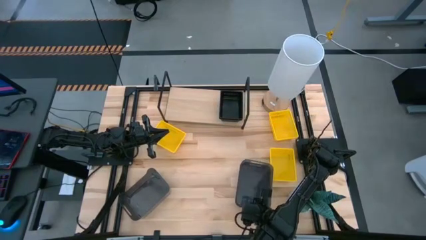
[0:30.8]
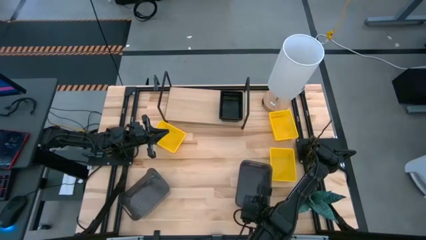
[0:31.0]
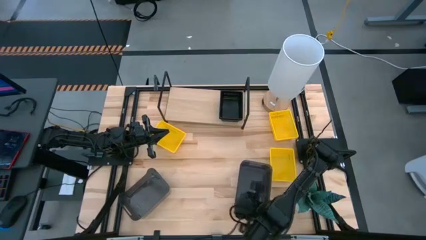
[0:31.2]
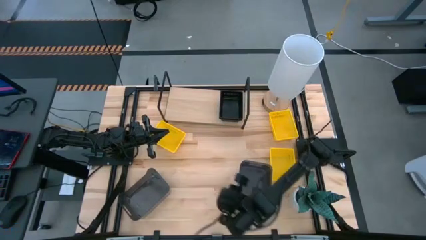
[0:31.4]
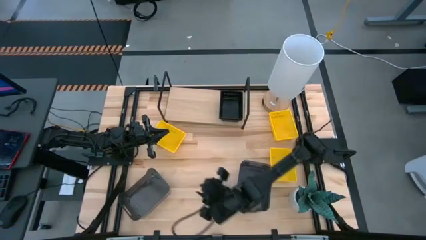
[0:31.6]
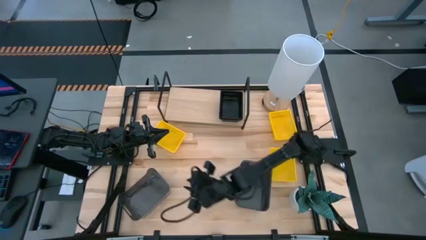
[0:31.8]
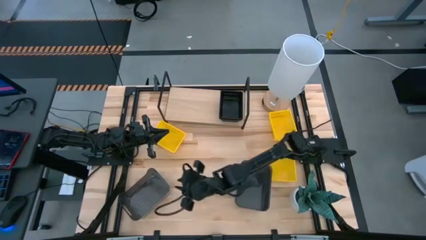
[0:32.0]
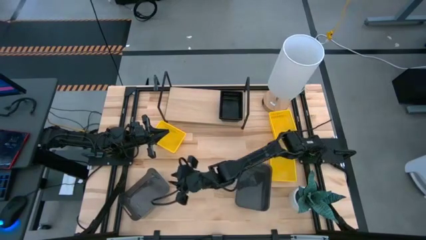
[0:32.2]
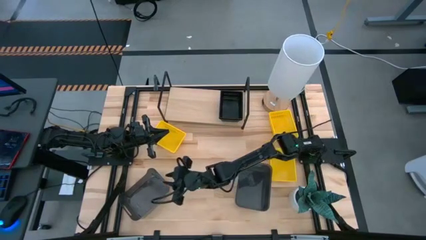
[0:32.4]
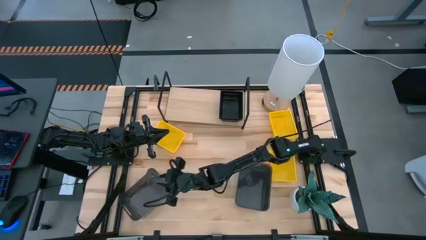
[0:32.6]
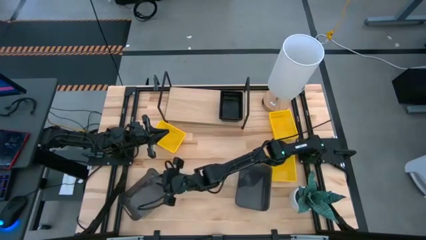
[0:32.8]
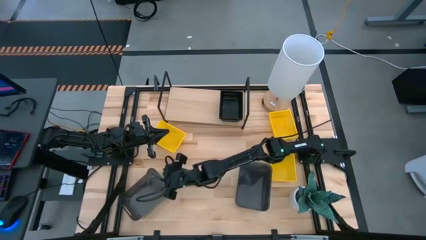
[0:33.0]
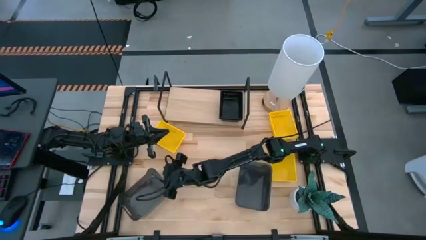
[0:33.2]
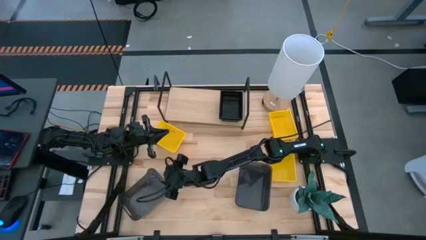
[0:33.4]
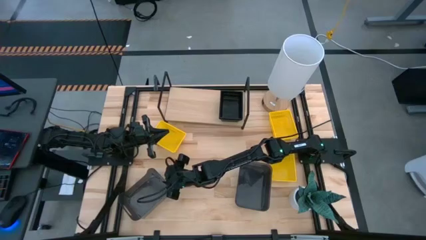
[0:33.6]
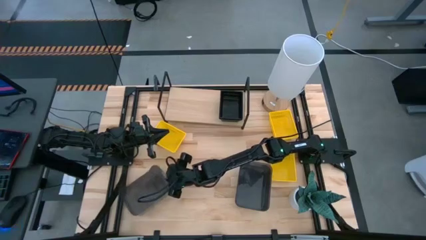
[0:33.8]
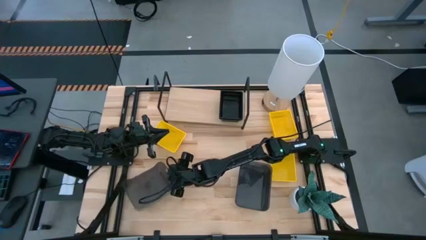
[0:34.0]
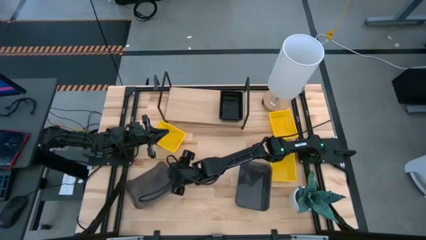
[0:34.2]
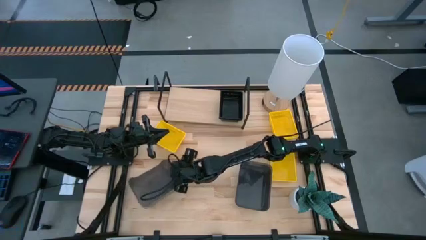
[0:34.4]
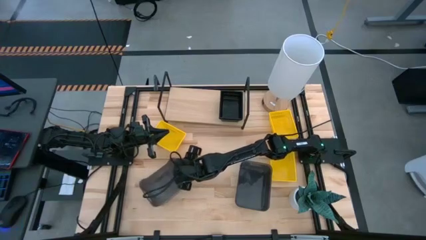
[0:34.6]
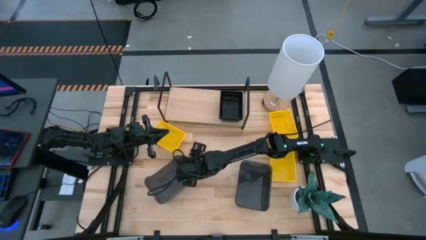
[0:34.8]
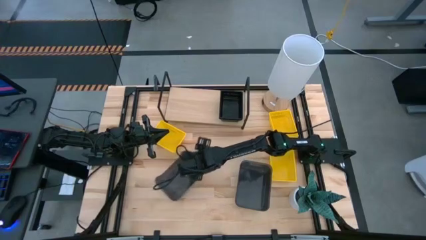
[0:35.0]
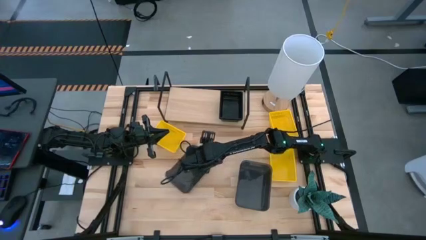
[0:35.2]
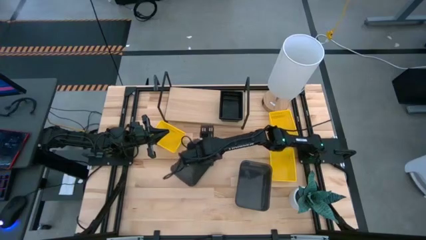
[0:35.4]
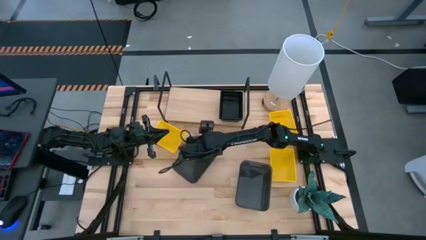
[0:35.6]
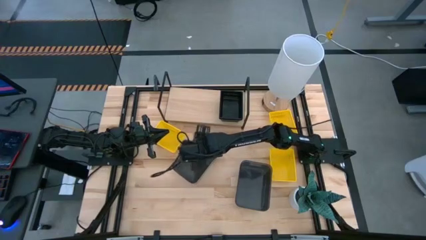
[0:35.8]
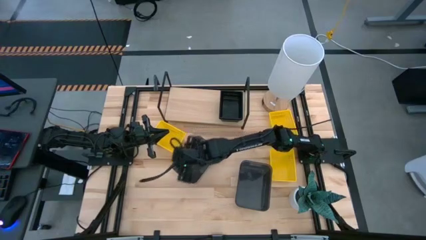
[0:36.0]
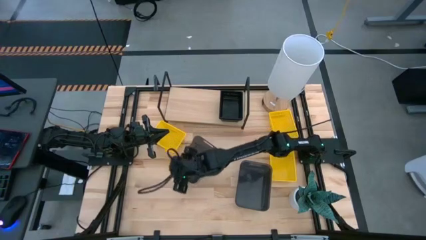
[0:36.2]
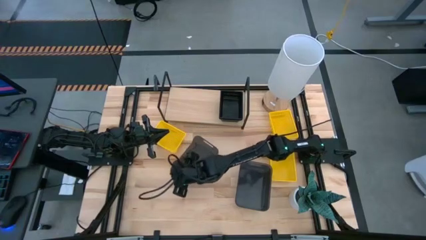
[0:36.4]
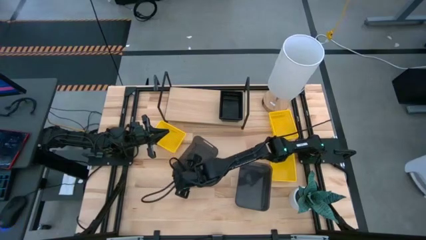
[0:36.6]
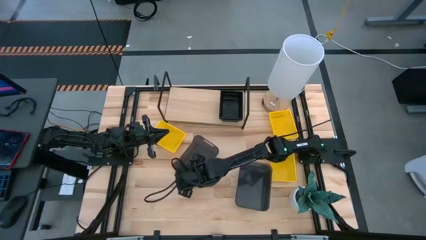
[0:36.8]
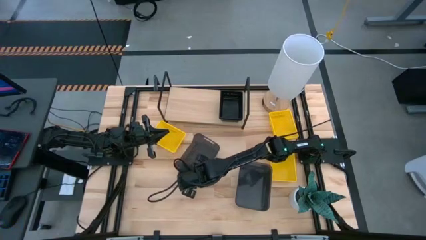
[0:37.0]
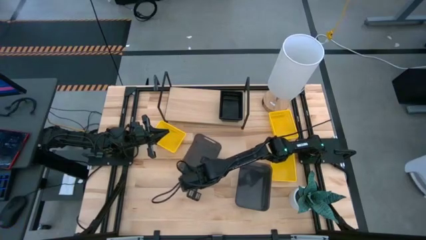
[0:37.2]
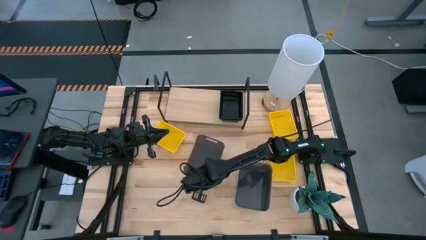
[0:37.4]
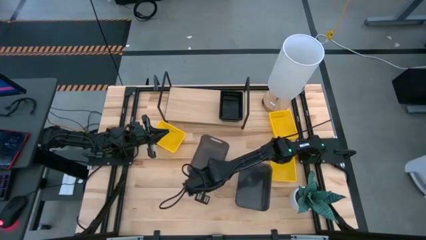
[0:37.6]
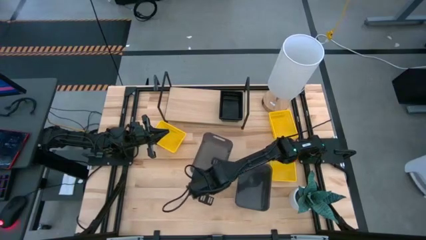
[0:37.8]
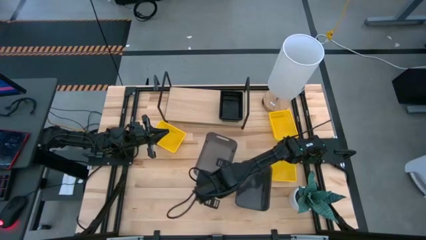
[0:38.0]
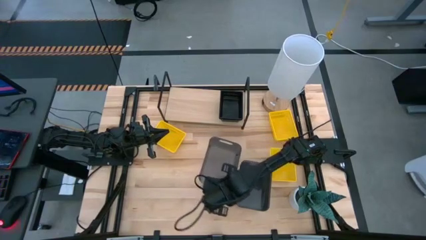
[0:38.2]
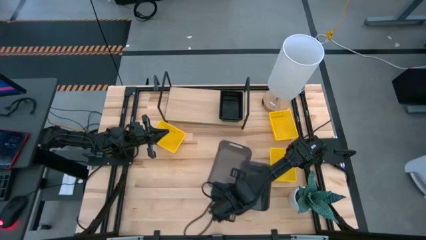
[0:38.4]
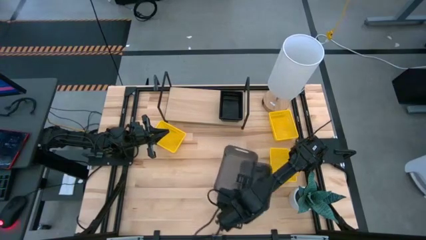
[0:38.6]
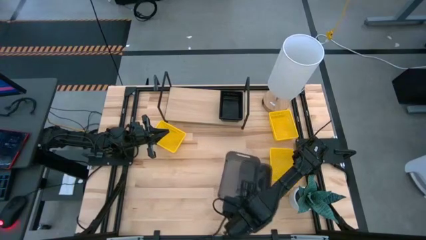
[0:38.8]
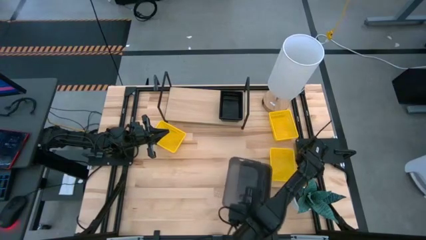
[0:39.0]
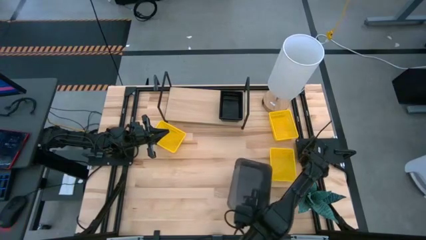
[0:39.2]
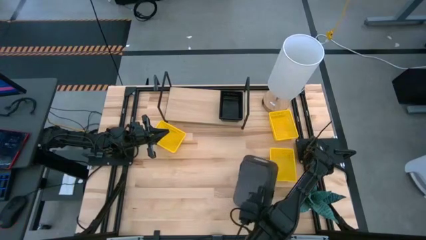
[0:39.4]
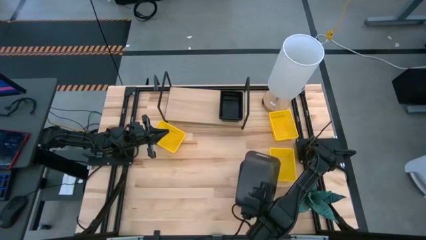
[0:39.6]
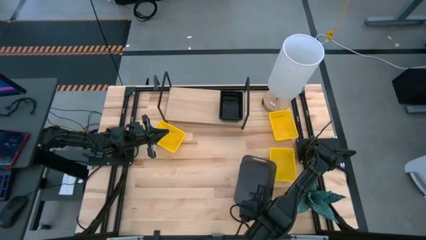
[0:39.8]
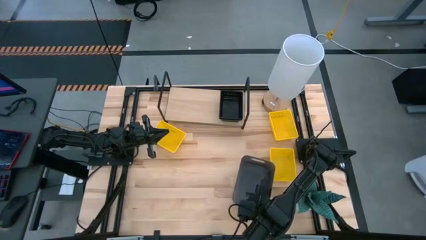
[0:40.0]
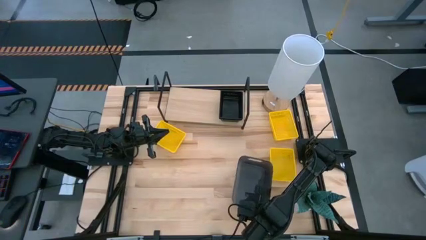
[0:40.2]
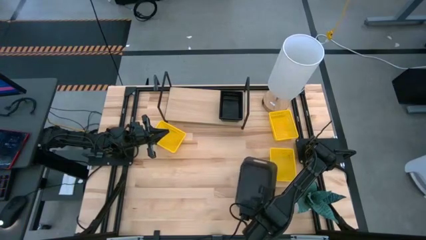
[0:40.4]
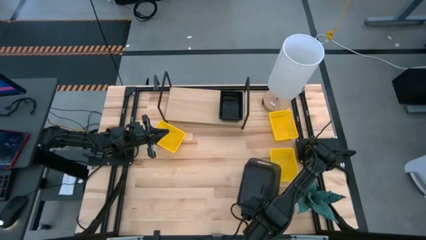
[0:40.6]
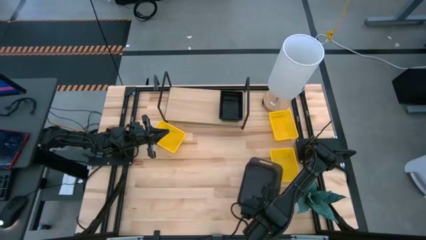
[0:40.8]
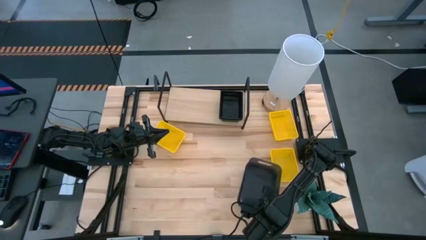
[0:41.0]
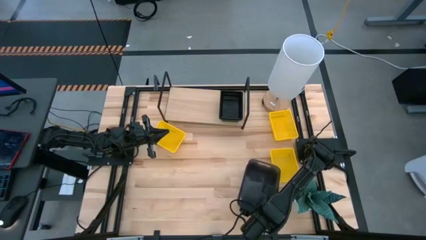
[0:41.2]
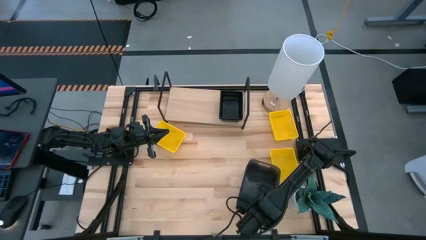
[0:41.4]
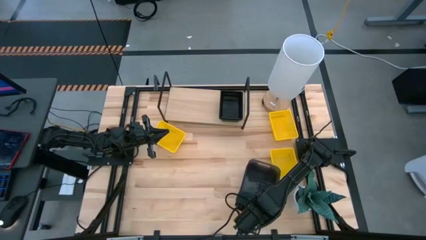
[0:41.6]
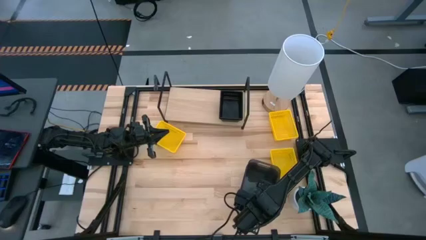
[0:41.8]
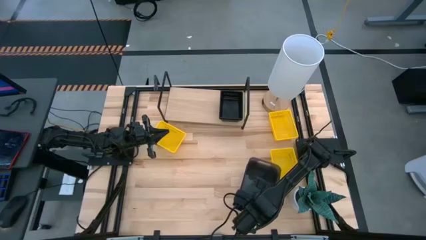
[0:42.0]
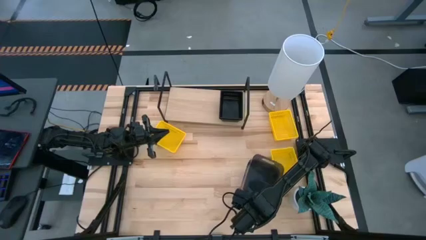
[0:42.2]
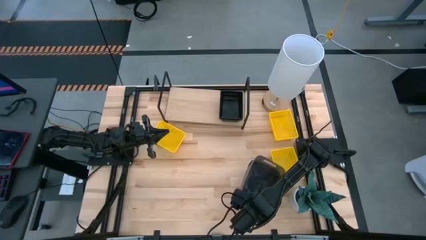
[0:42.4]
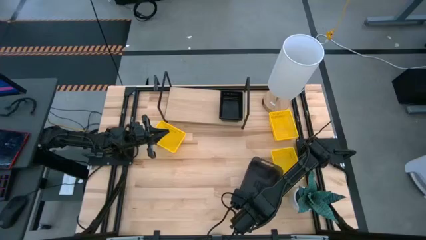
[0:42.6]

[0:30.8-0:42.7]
Task: Stack baskets on shelf by color
Stack the light black bin on the top of the light black bin

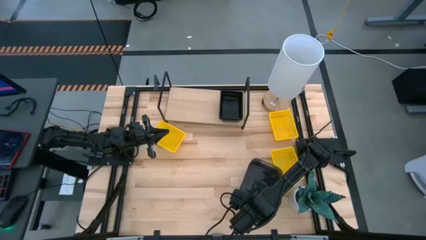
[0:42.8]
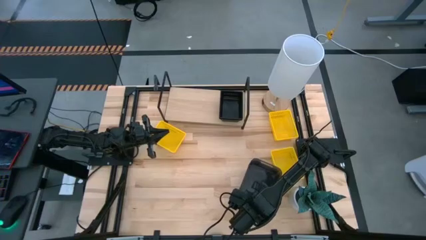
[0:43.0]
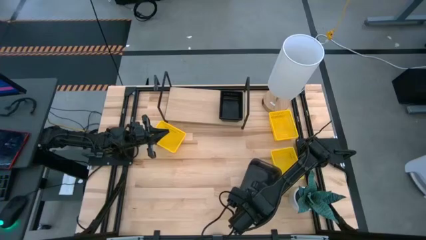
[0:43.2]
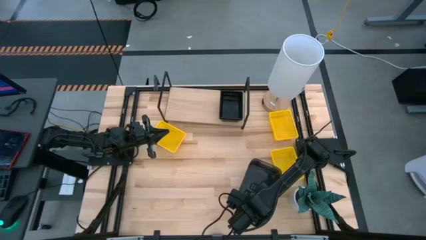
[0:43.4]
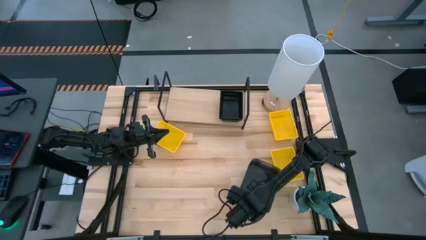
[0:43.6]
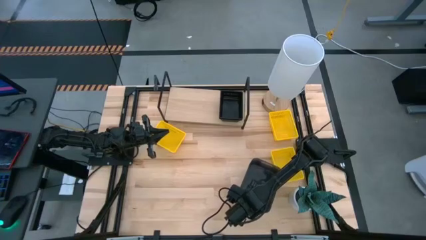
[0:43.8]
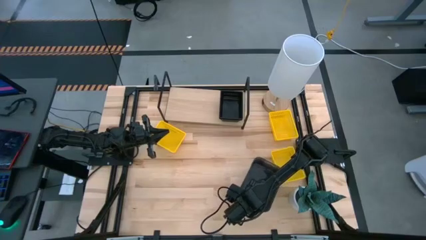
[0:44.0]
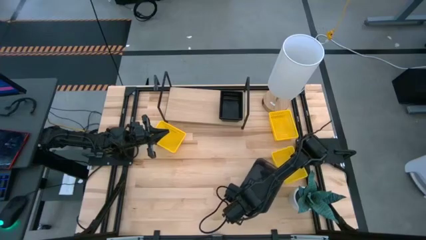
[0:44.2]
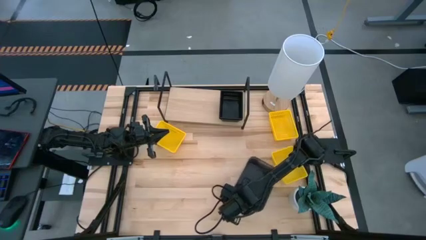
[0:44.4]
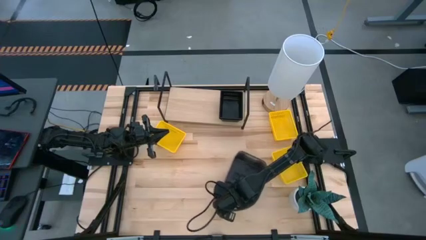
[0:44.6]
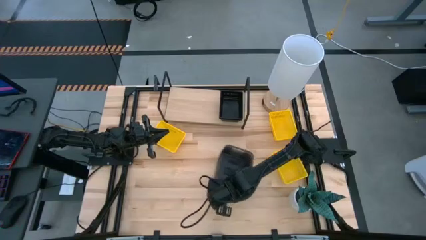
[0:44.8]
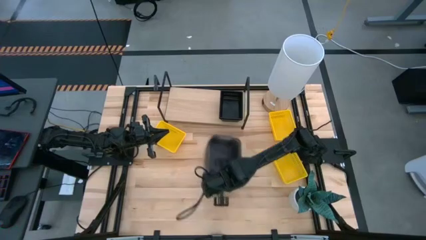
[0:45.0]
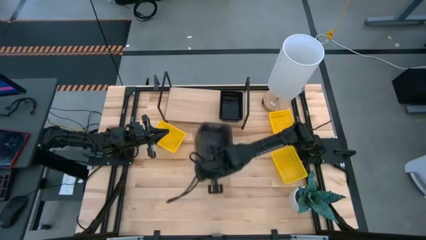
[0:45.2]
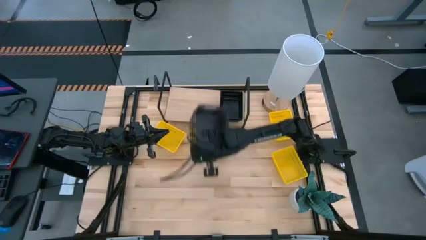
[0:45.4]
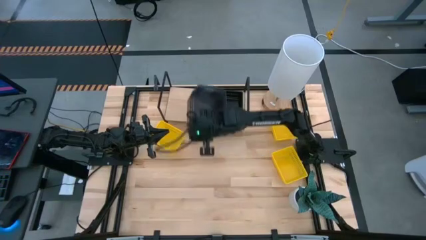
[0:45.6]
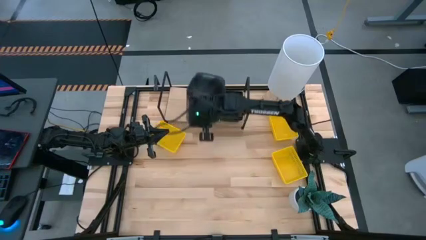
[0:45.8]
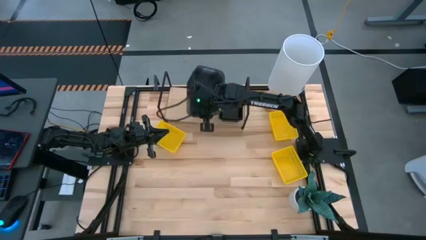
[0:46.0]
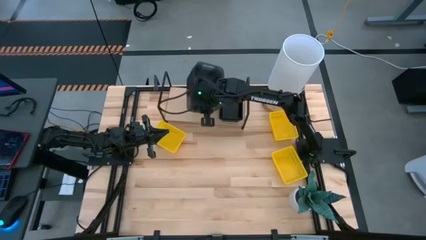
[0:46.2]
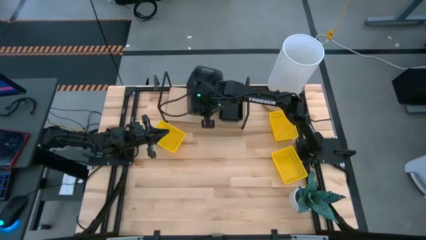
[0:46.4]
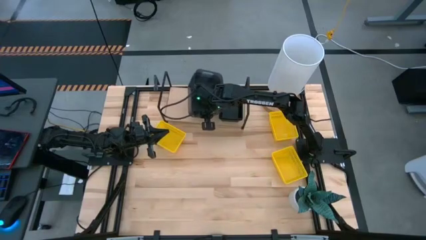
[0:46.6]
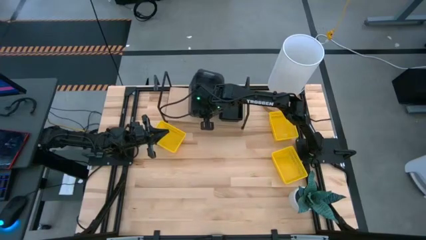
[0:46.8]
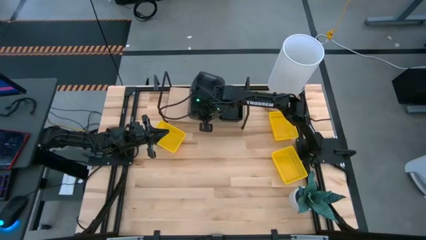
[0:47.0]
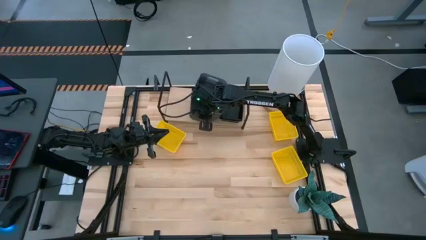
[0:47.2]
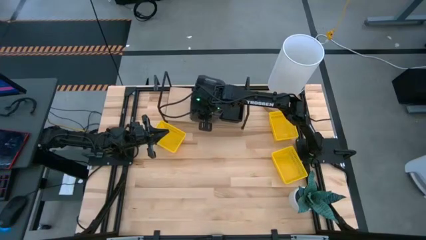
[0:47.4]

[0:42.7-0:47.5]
Put the stacked light black bins on the shelf
